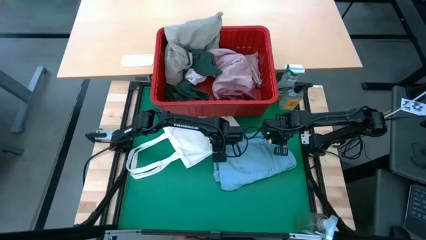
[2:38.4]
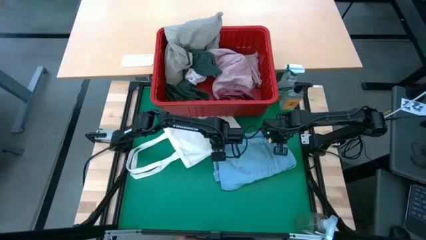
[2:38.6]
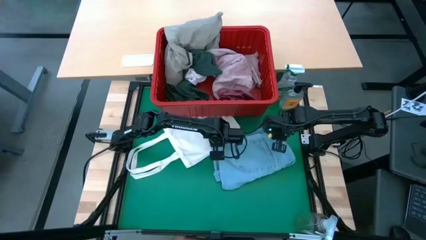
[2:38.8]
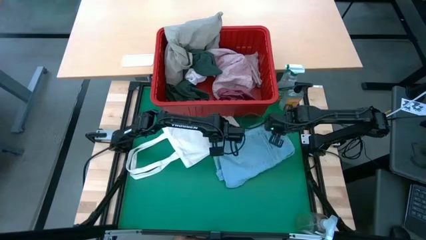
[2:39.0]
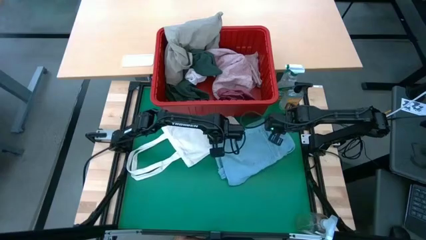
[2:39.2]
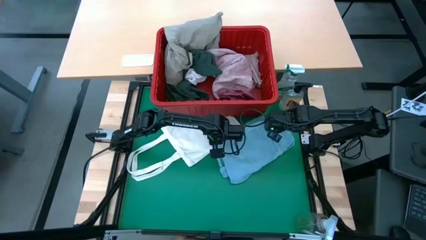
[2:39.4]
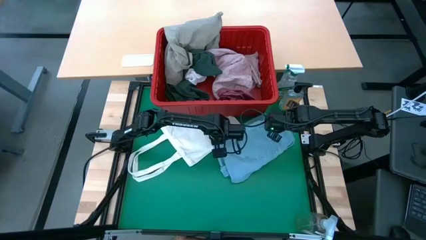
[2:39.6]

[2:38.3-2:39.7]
Task: Fold laundry
Fold the blue jeans

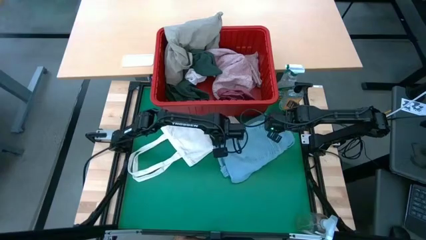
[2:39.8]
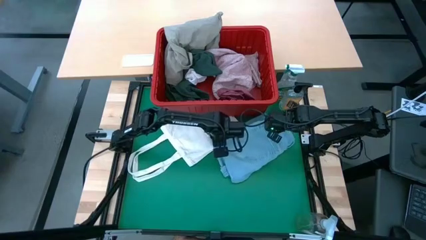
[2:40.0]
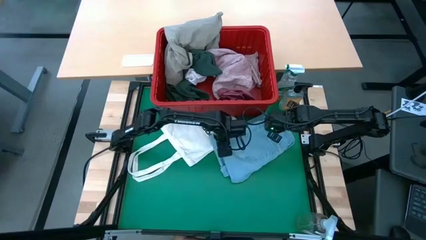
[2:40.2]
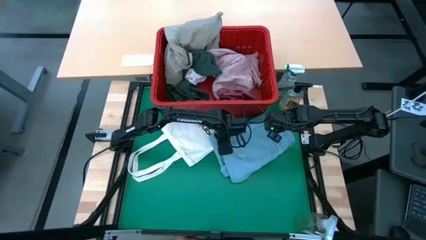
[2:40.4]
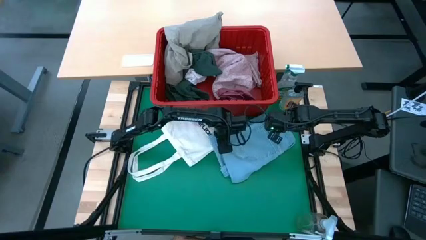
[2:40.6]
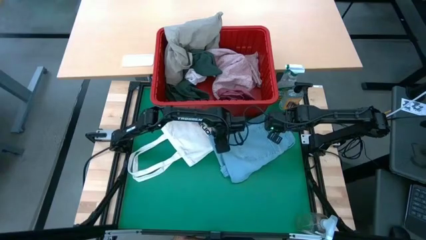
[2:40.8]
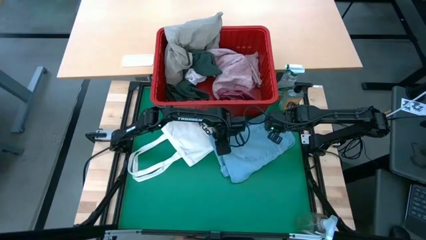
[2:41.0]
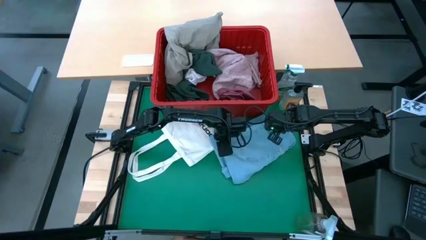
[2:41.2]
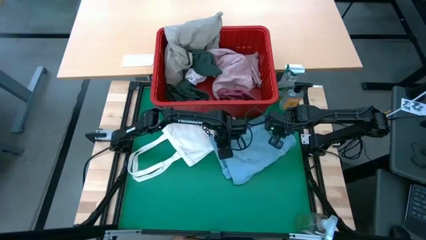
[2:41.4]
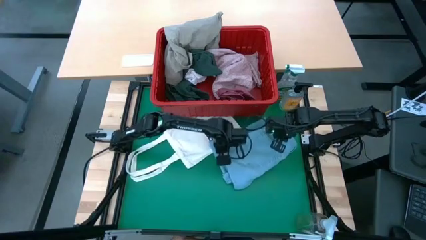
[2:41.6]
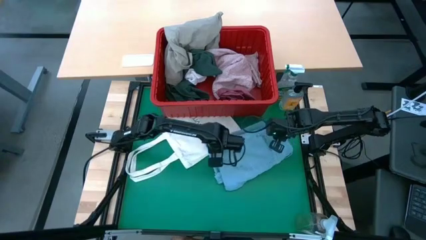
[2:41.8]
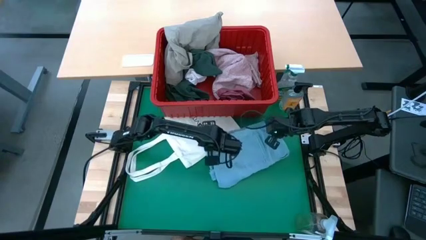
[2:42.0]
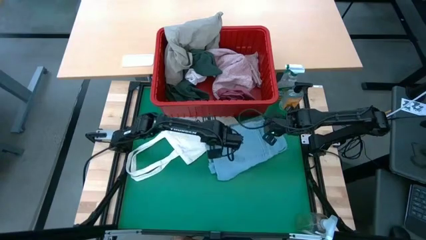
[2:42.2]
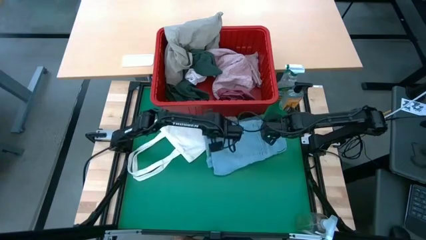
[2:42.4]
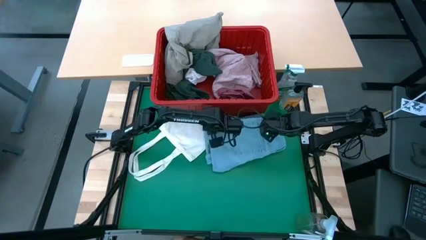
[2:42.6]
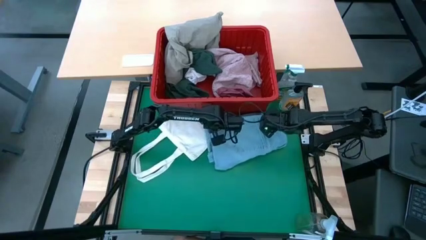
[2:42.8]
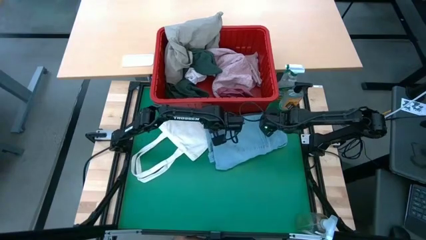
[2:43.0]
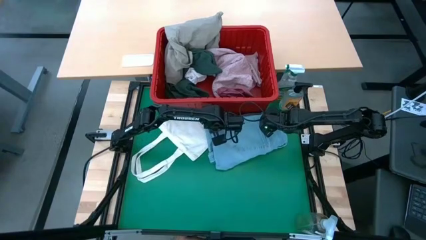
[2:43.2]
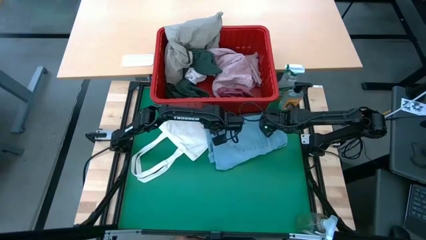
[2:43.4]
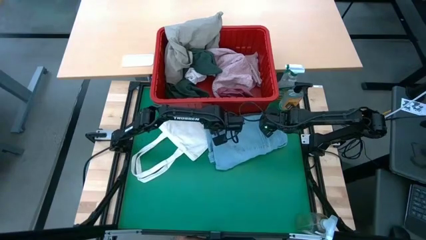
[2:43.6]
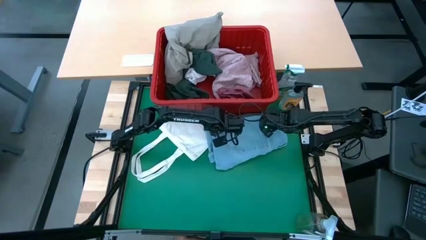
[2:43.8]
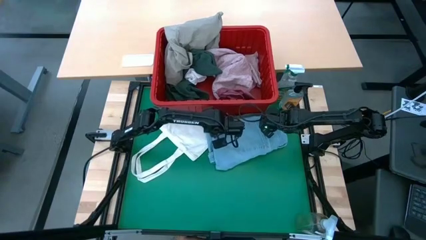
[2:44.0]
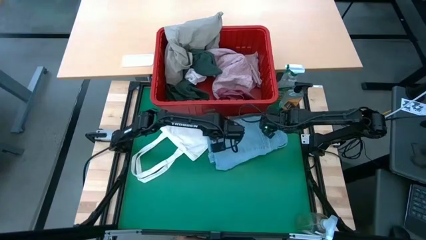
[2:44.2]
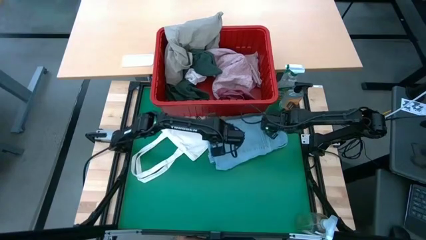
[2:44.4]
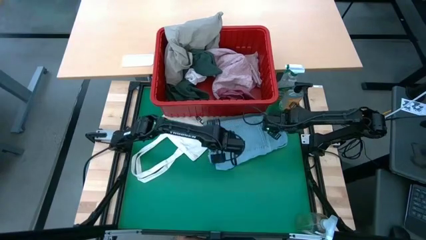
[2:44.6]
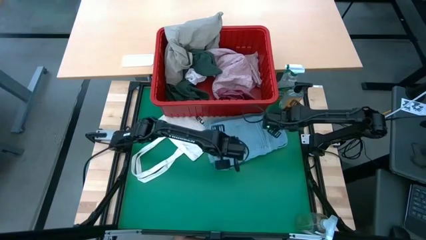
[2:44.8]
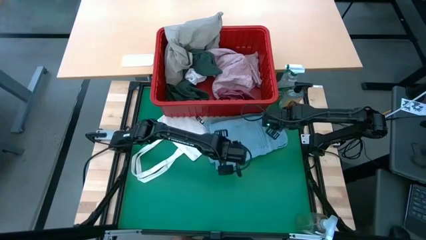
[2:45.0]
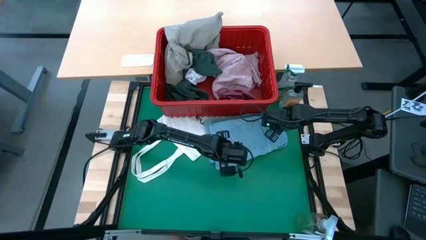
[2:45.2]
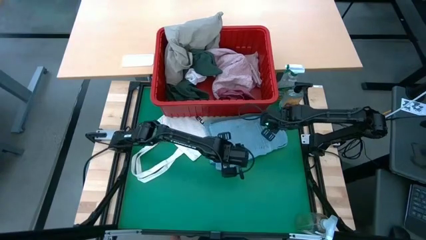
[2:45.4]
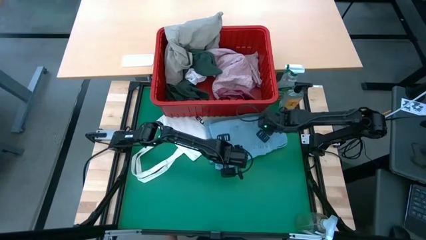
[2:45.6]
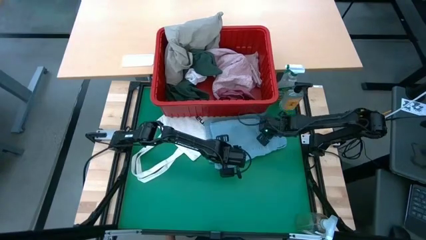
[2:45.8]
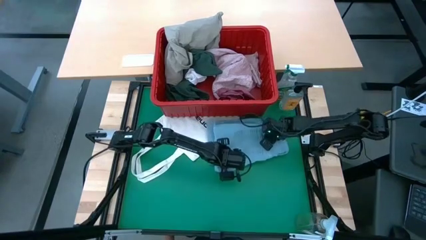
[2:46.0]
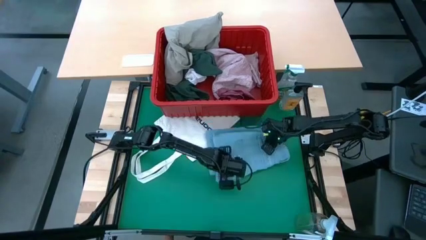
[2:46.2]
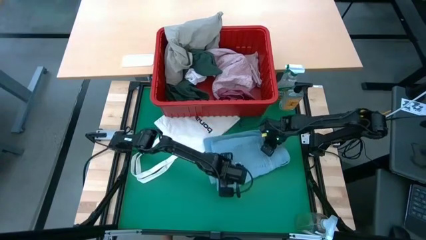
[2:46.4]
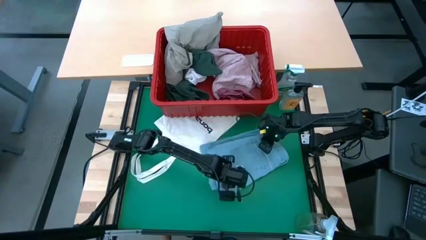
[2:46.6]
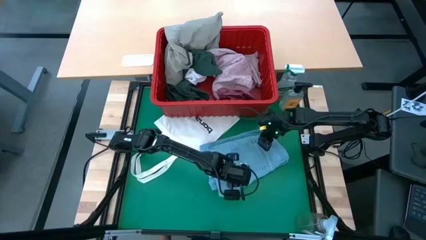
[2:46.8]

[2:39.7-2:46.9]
Fold the blue jeans

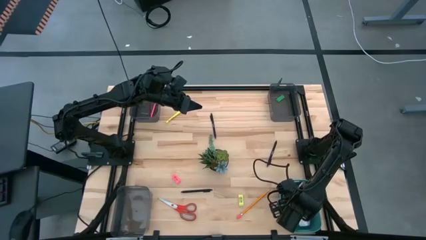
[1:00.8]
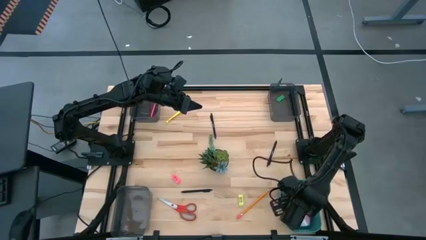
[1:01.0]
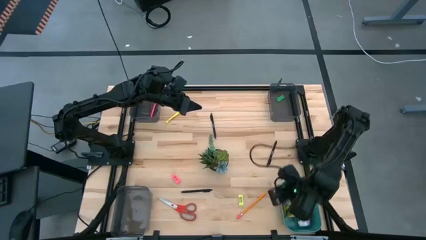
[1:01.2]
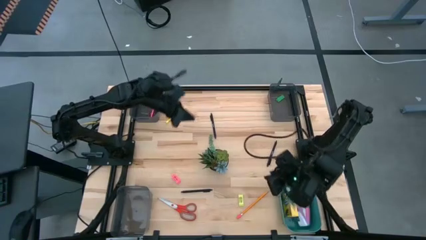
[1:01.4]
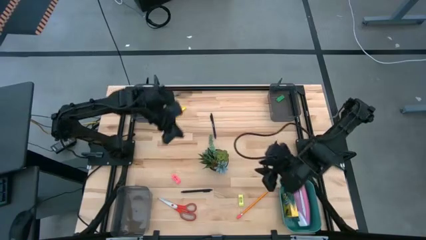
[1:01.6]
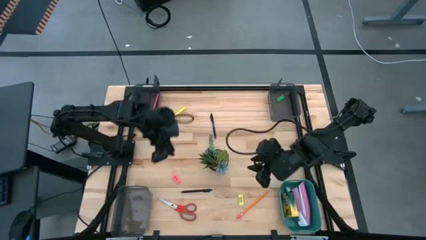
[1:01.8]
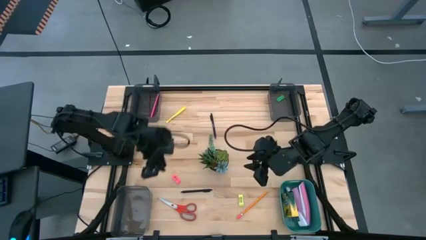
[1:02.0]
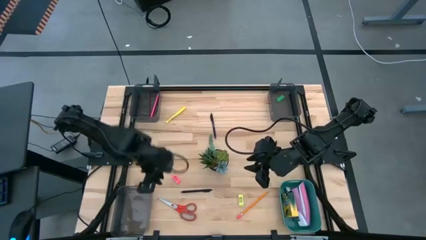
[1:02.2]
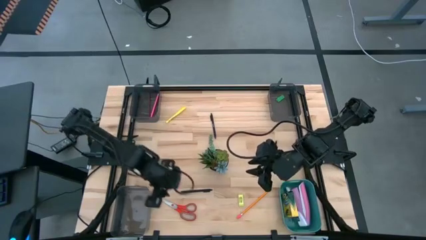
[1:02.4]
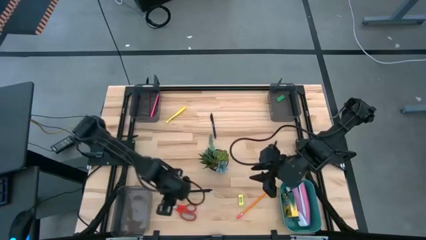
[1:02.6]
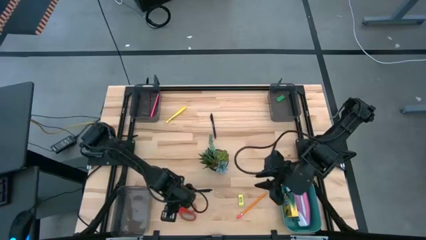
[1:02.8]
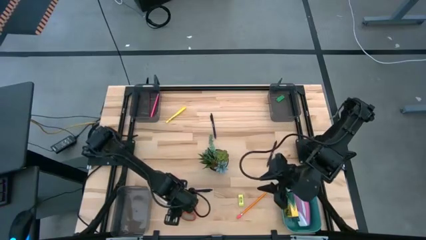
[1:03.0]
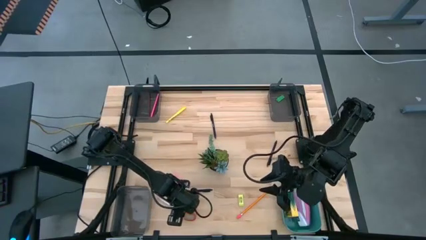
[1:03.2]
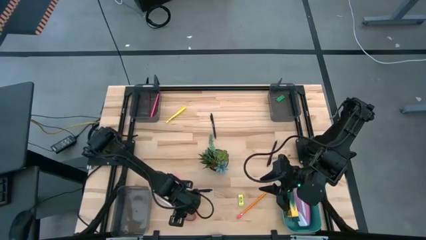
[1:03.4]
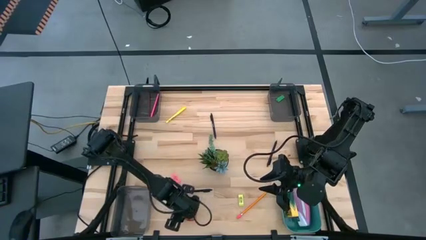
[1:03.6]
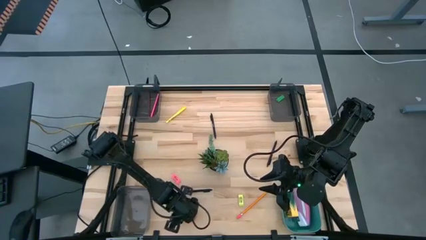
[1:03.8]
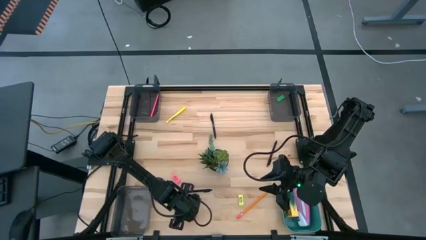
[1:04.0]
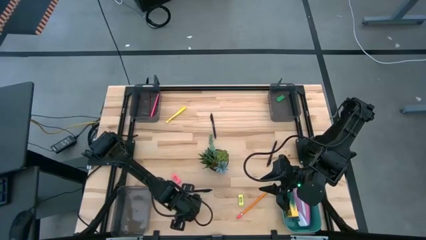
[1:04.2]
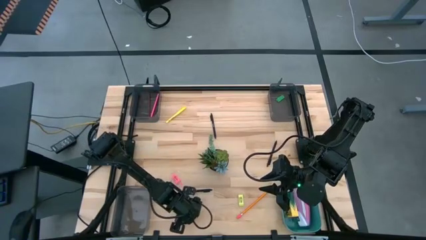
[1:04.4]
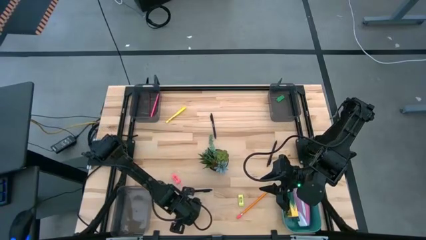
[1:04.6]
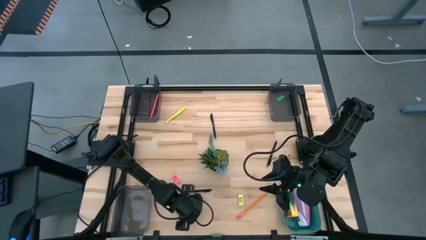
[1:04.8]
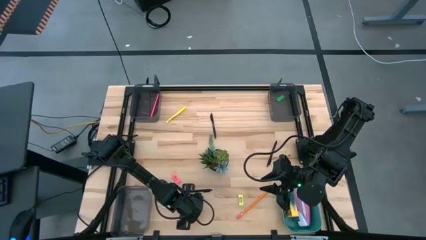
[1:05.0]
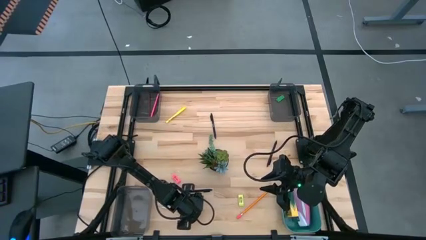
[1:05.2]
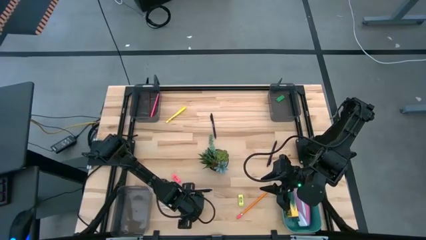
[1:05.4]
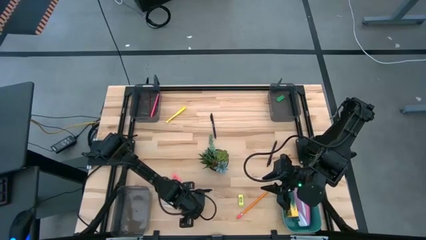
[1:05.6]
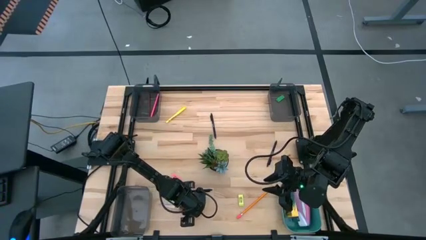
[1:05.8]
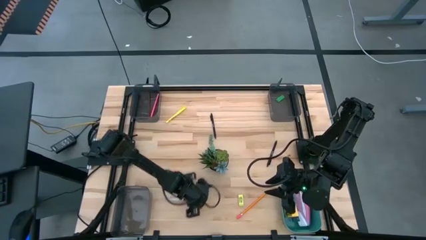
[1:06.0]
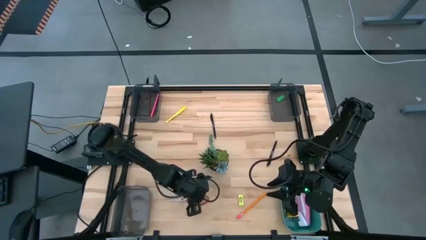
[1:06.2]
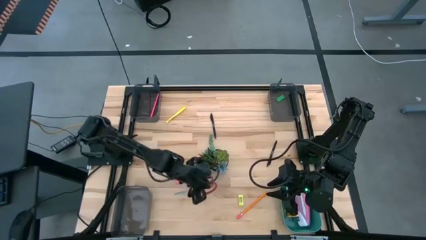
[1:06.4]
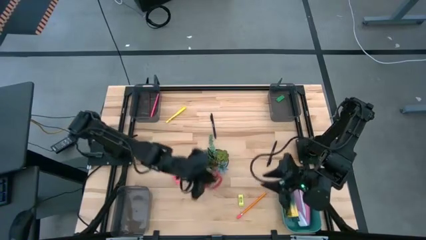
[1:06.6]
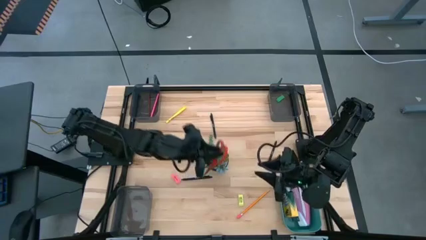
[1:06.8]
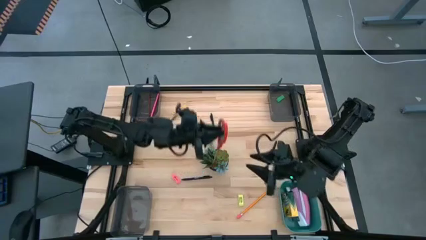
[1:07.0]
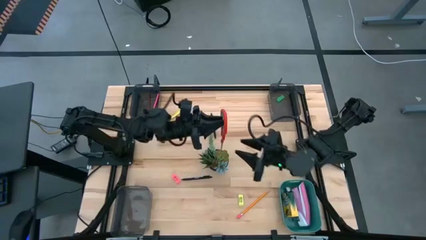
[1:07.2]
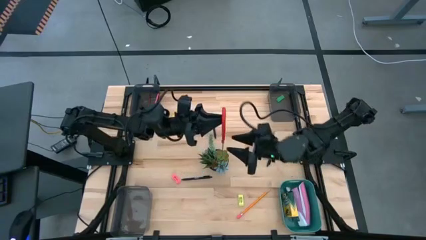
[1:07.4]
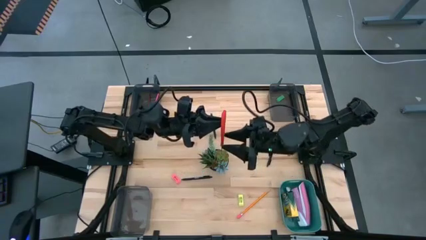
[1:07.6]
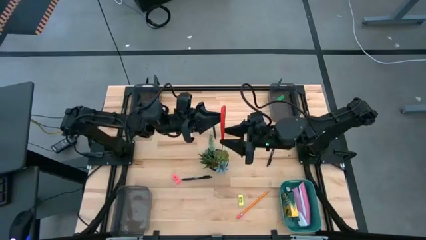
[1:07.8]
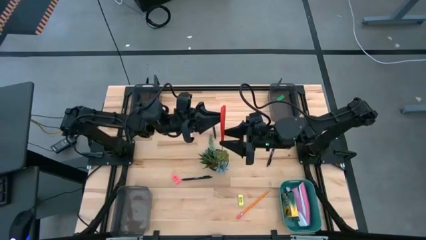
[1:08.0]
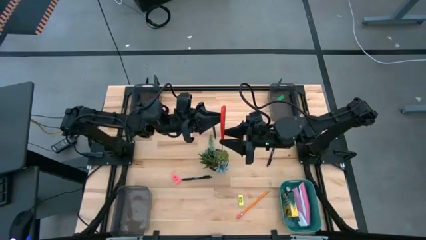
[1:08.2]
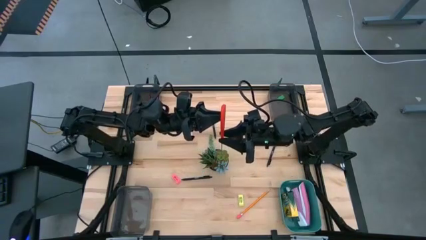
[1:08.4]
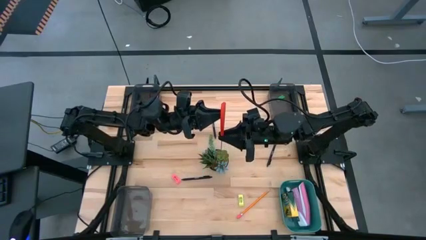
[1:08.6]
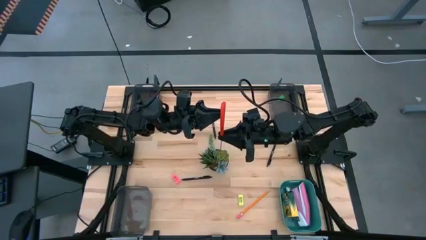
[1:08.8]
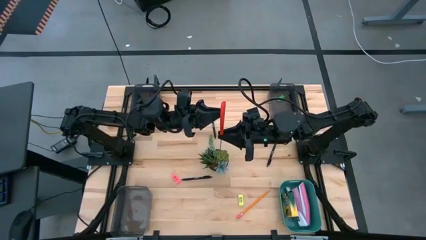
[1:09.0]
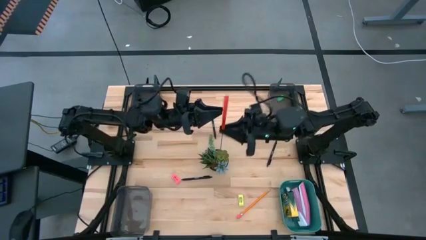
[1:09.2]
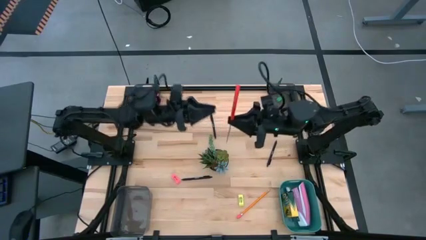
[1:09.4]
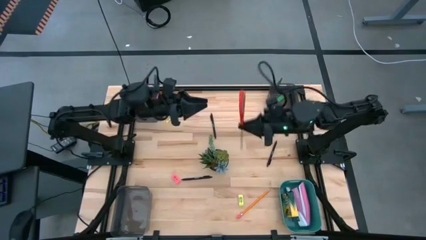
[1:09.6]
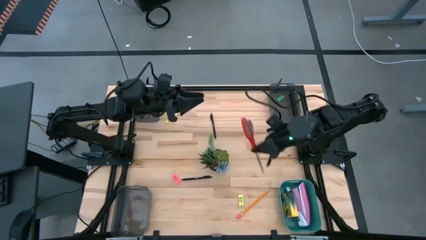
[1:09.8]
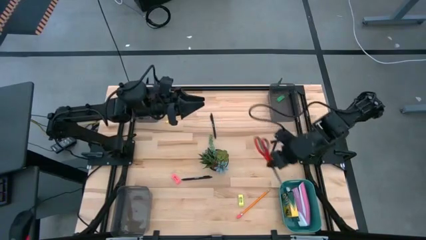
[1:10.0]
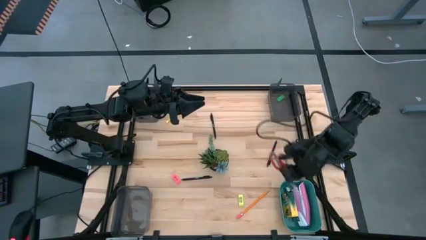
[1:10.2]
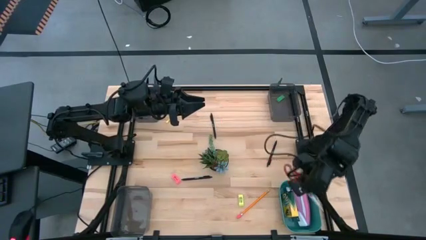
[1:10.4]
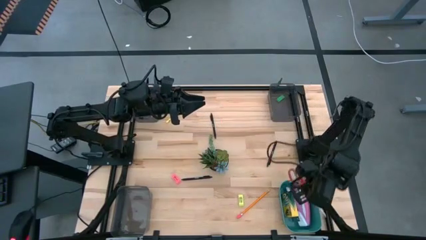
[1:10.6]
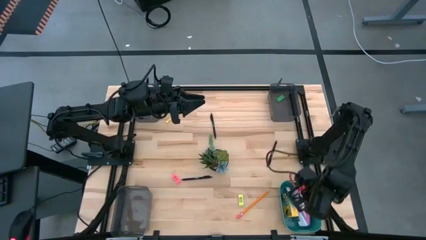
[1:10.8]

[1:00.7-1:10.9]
Task: Sort crayons/erasers/pens/pencils in bins
Put the red scissors into the green bin
